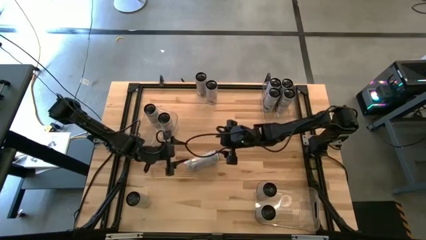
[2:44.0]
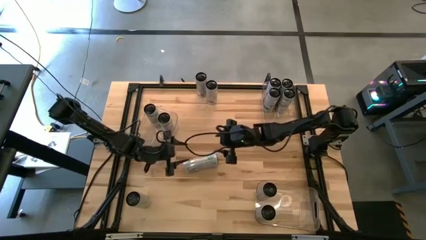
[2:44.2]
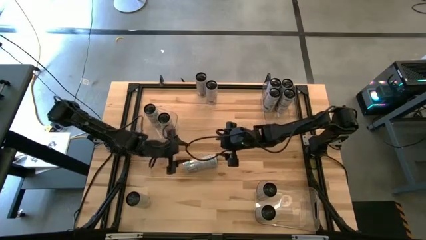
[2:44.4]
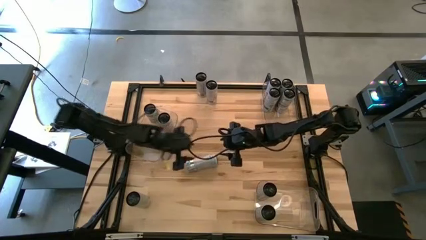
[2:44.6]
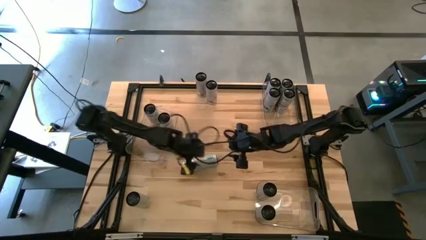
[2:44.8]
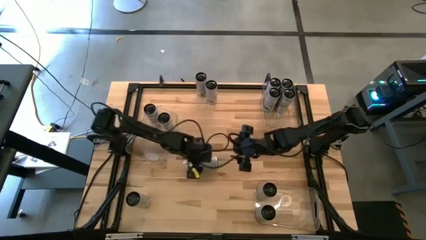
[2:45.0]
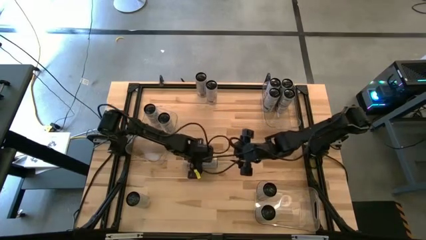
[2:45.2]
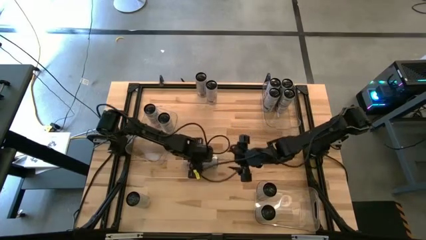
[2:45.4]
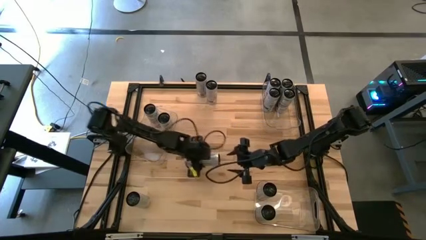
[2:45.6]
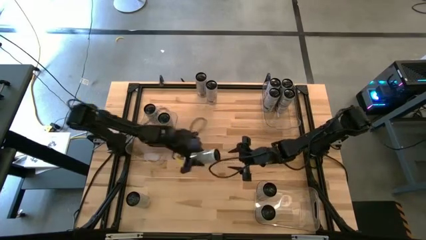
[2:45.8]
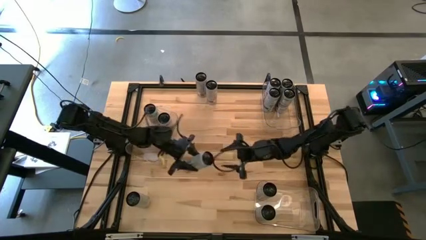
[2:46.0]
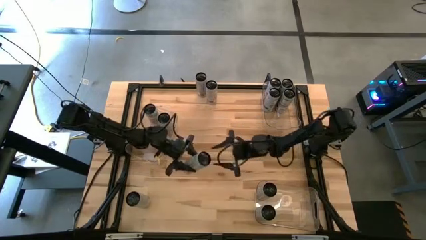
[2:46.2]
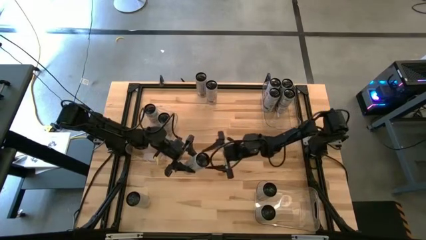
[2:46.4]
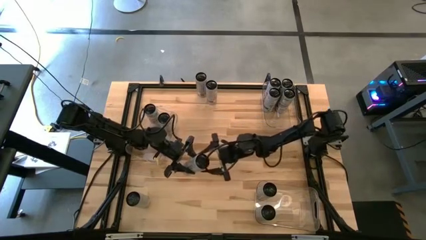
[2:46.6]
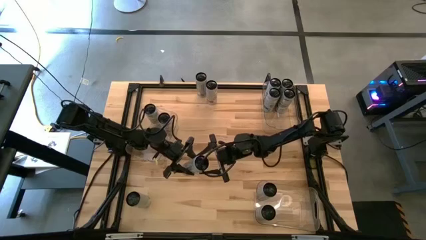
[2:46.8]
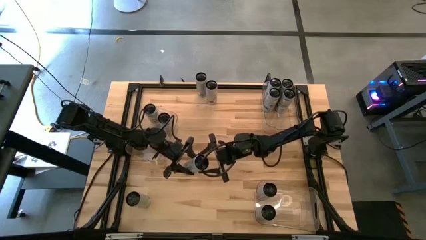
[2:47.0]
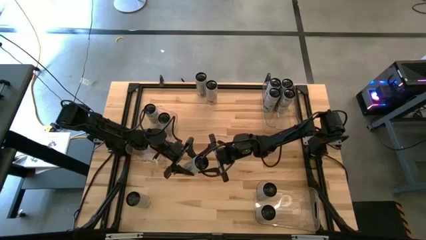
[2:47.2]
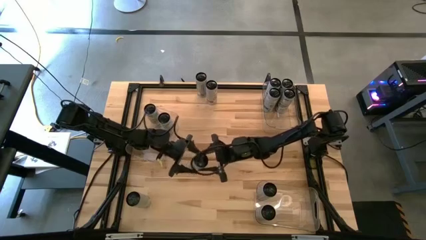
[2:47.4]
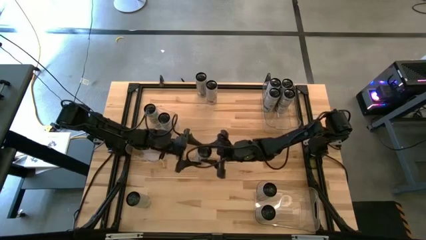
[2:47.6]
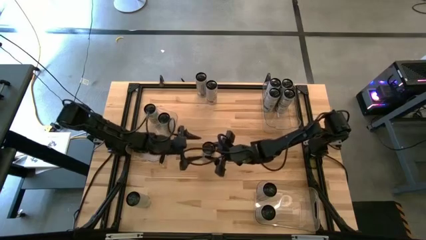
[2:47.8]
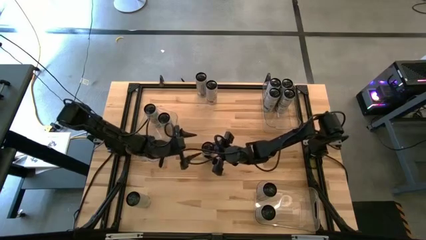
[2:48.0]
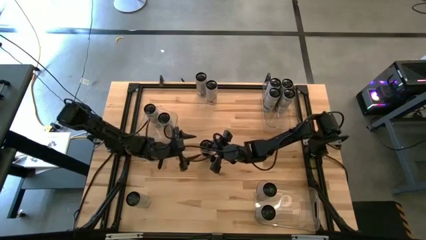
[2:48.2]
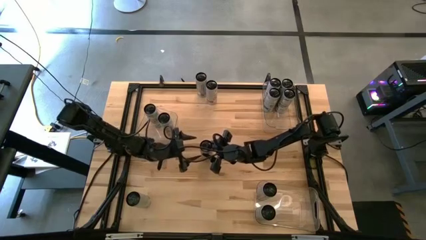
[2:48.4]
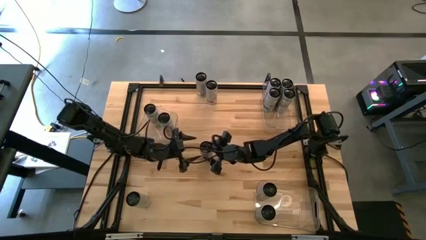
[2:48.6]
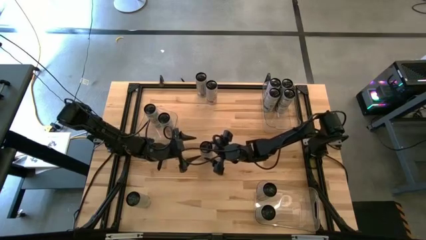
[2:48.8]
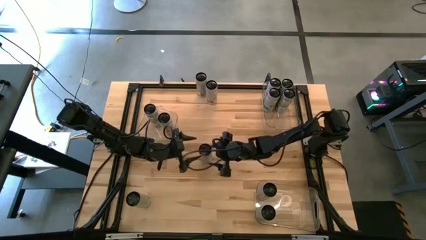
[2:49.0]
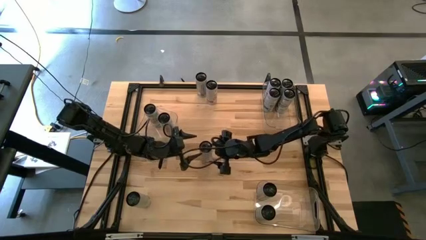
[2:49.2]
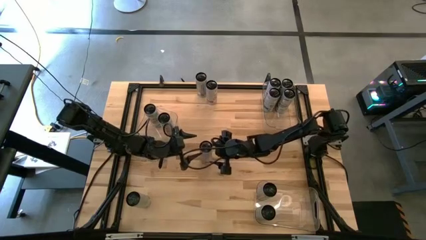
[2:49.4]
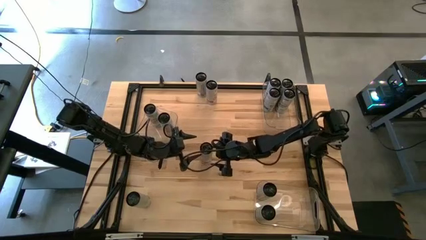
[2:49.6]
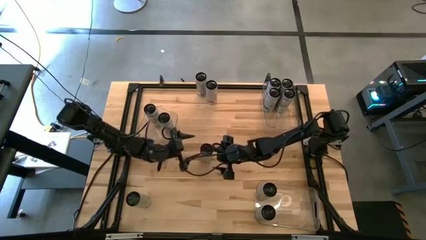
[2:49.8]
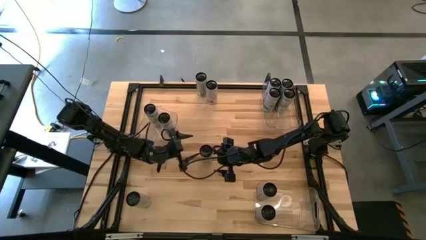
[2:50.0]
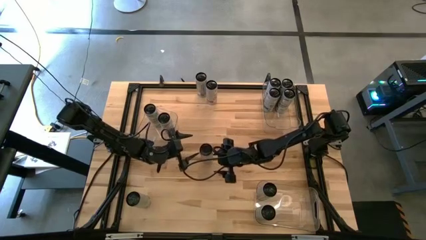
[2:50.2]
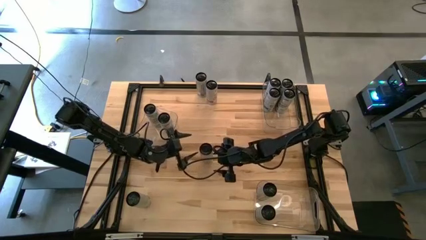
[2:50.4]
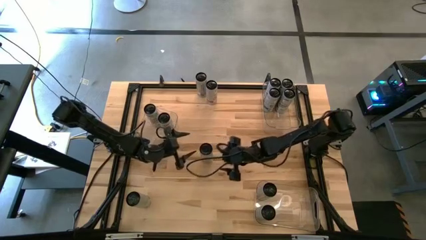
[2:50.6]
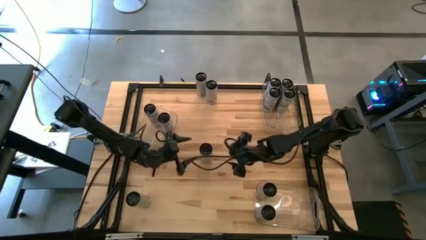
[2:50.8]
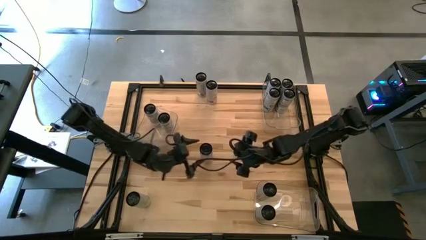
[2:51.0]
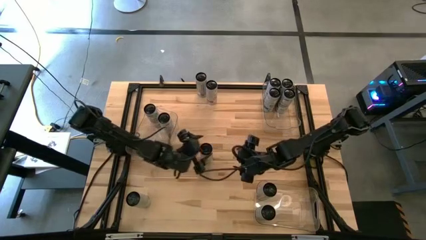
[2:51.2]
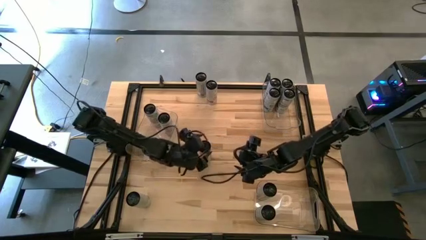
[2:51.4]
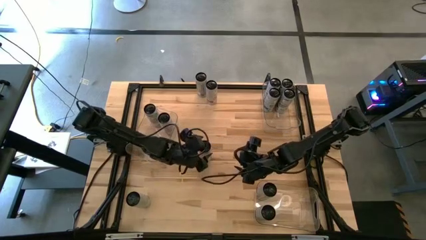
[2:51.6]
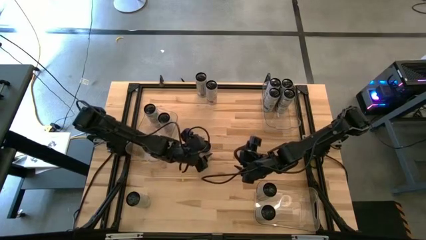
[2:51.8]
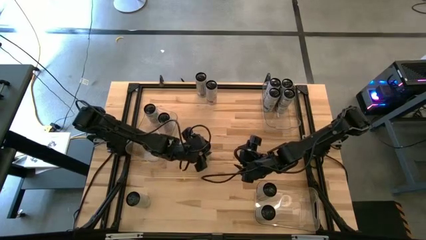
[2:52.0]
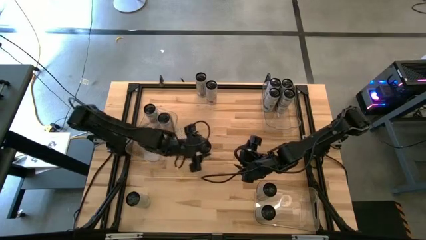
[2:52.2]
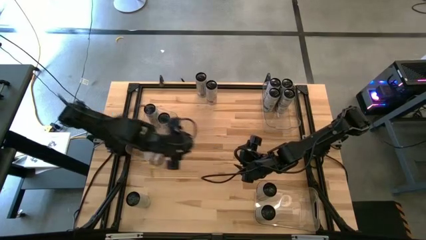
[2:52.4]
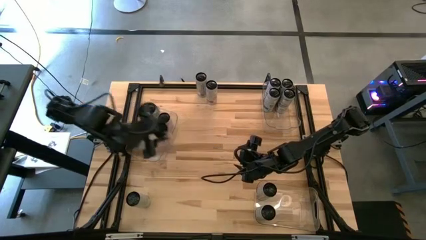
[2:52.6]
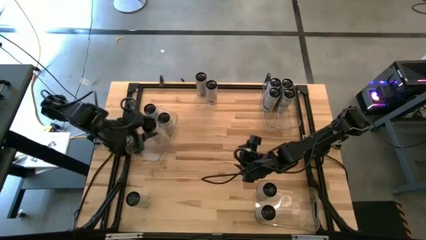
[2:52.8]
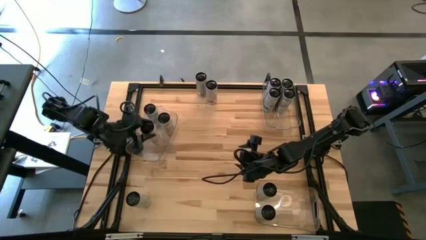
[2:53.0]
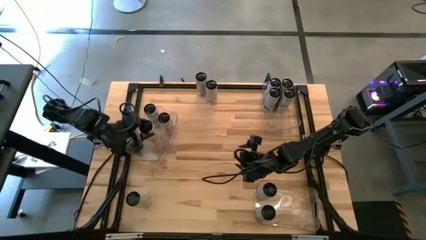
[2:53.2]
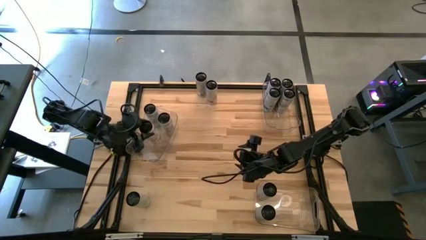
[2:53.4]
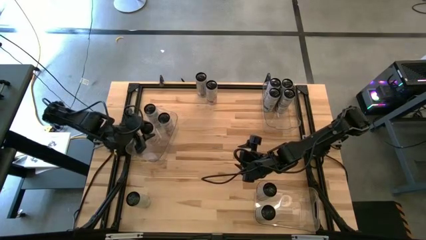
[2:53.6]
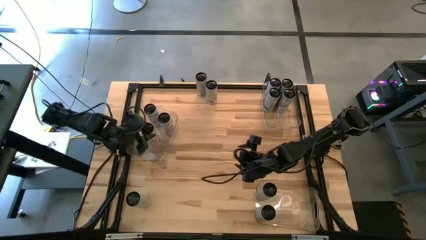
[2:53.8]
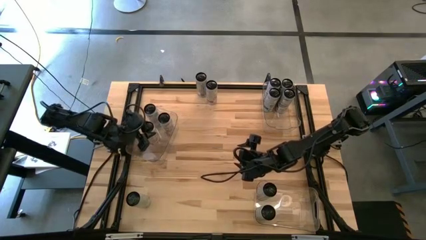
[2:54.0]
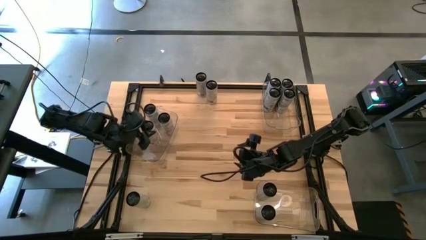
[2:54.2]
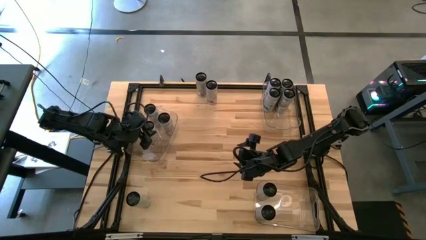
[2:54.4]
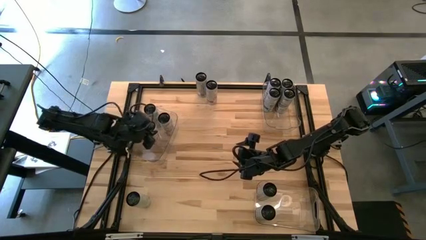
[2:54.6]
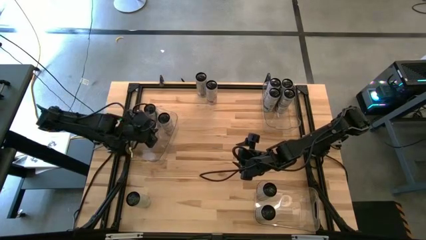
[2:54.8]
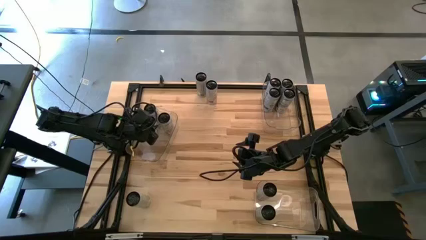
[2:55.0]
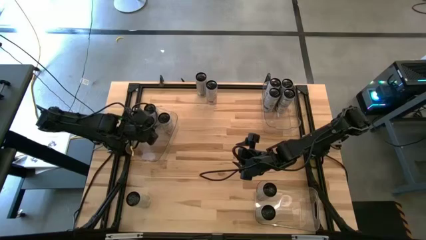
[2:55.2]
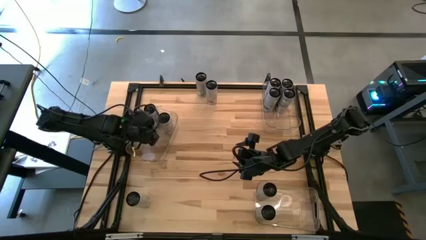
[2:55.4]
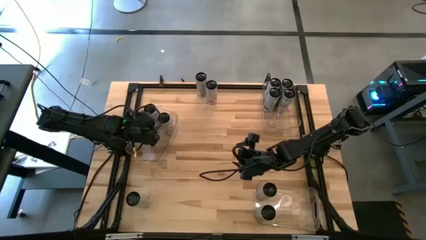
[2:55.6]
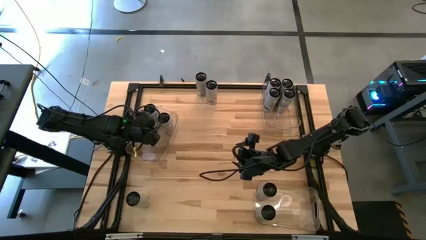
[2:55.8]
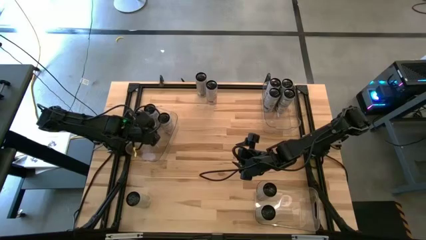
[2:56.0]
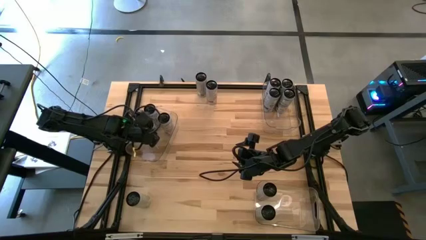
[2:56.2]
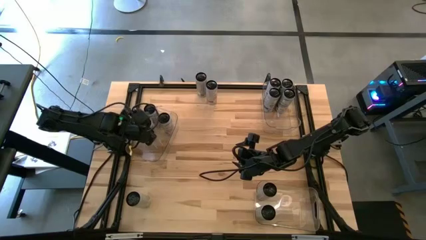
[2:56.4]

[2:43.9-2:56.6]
Task: Sort soda cans
Put the white-pink soda can into the middle transparent bin

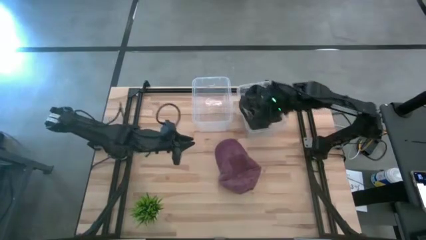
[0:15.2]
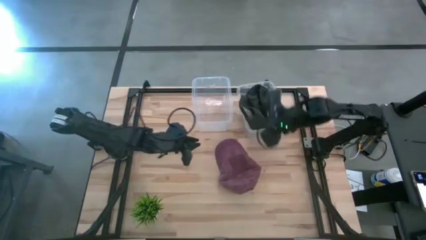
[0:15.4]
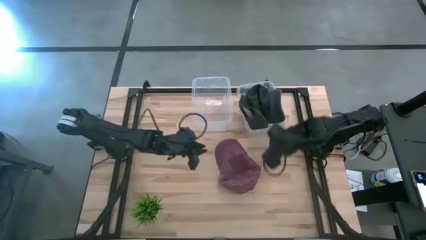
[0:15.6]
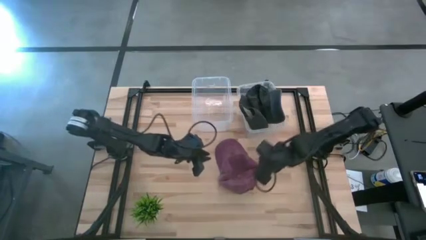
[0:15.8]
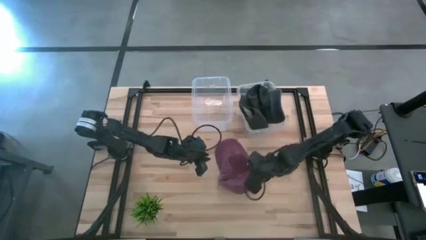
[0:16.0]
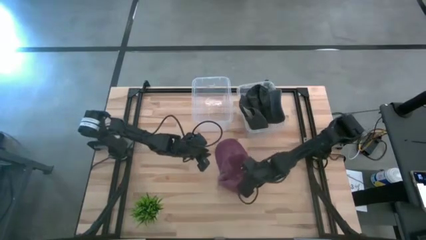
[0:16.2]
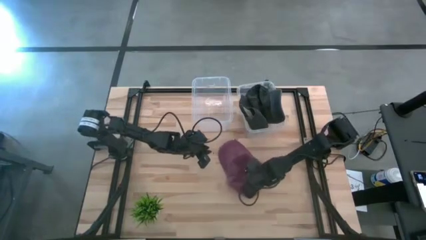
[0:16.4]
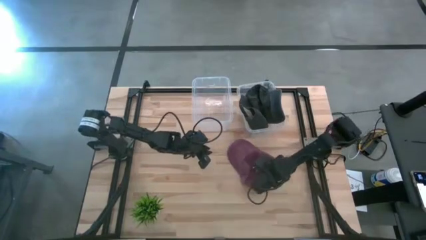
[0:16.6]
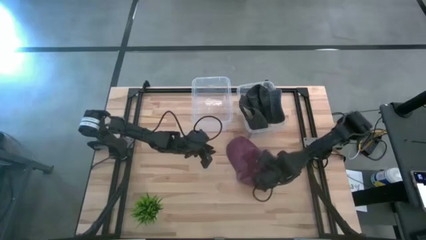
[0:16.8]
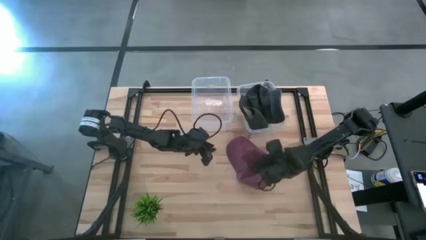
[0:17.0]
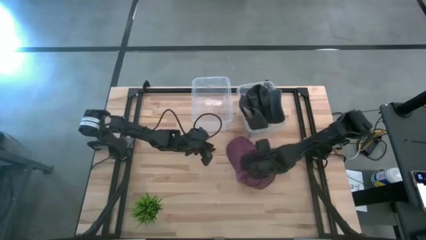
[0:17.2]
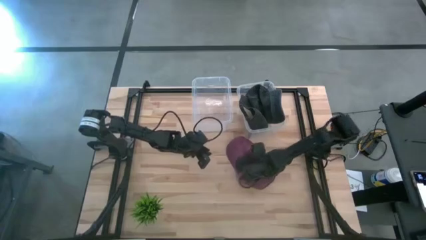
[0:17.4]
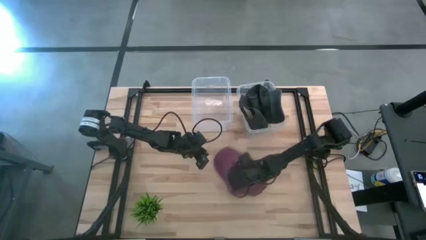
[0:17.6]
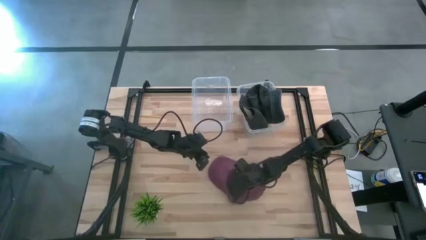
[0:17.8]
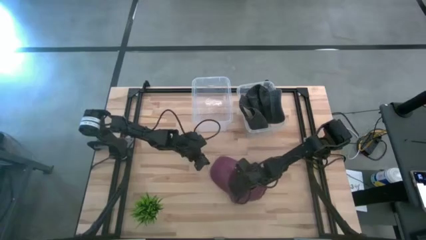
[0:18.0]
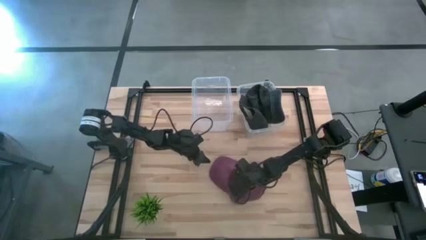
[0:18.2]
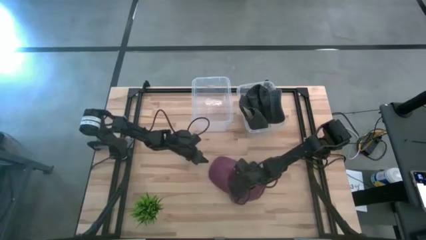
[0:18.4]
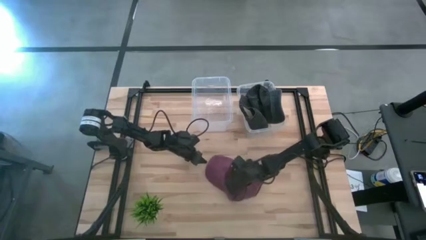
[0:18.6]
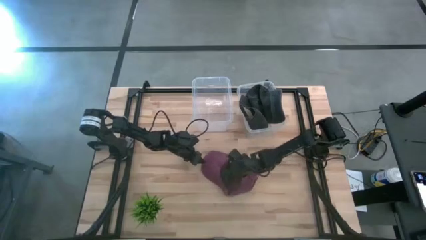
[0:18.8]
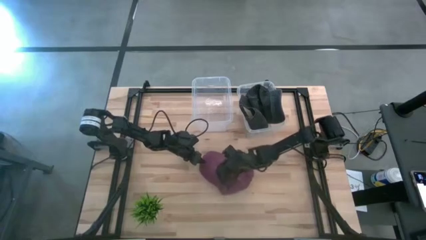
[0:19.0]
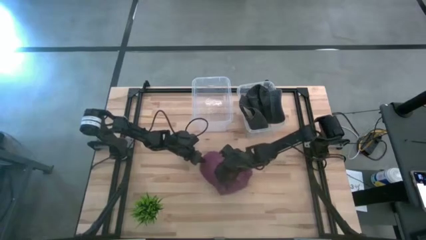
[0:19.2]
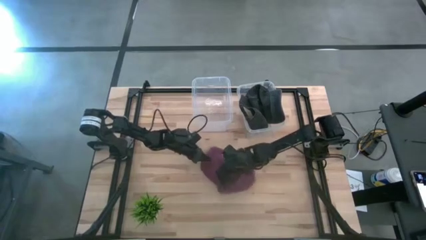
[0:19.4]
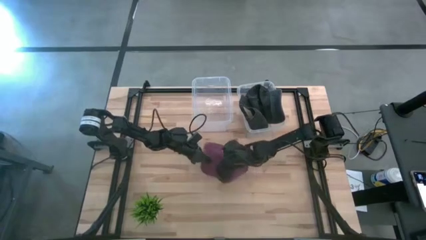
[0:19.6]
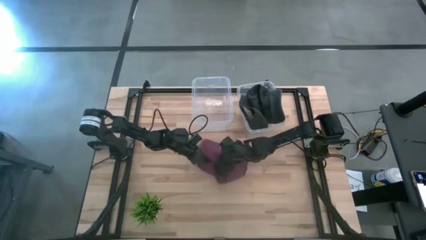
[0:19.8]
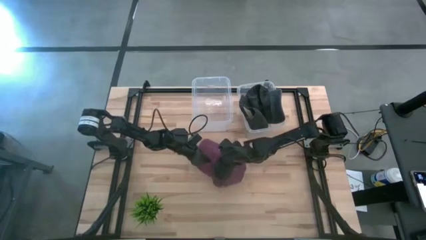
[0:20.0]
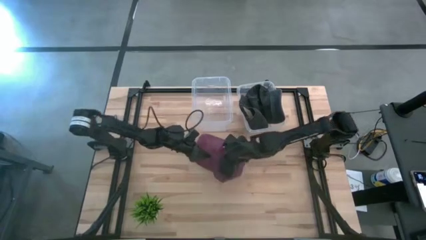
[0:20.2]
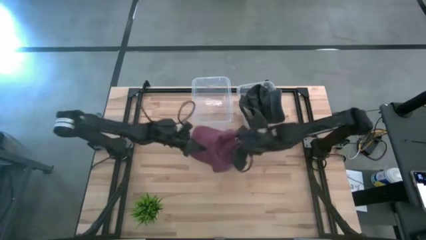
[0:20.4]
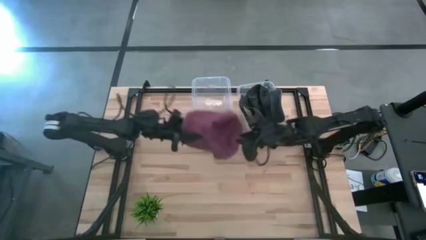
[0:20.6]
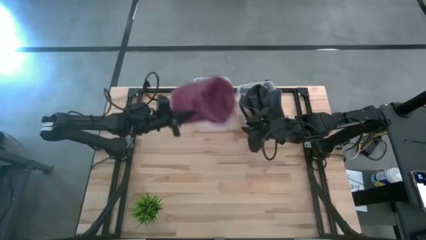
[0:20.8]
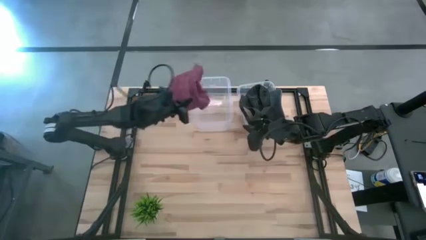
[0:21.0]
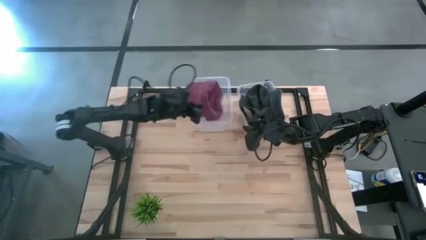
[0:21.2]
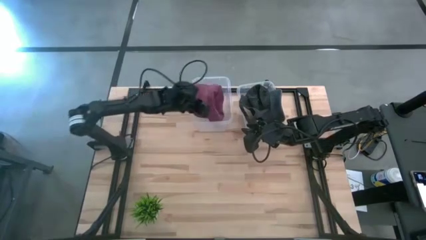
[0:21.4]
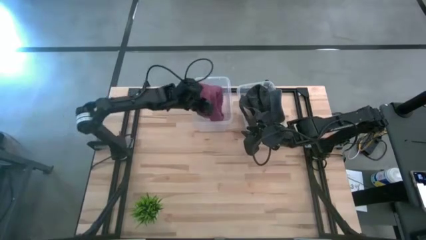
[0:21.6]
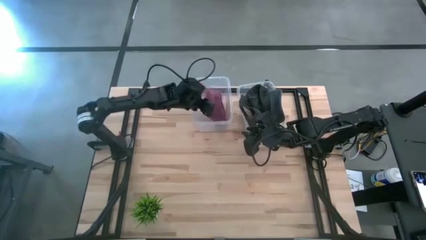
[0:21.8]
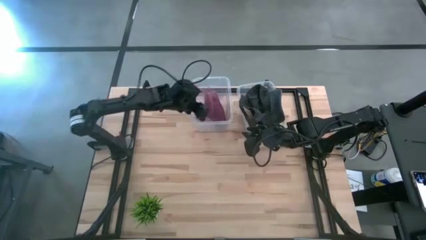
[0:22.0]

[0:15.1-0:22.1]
Task: Pick & Place hat
Put the red cap into the left transparent bin
